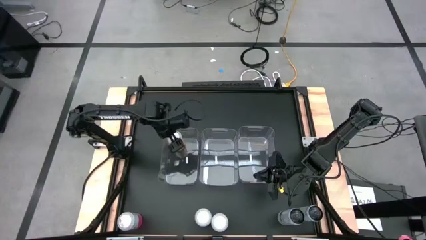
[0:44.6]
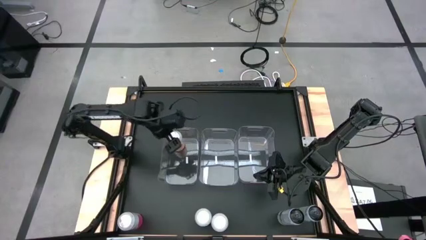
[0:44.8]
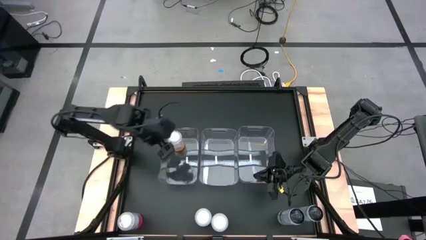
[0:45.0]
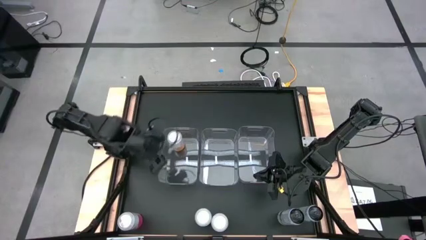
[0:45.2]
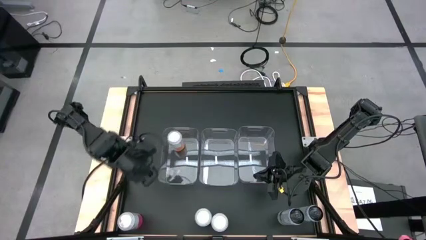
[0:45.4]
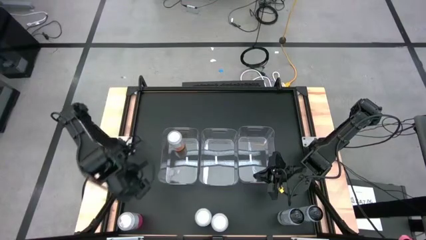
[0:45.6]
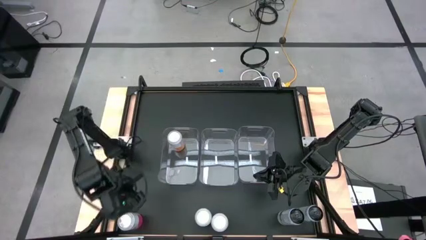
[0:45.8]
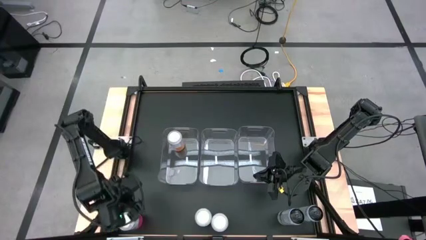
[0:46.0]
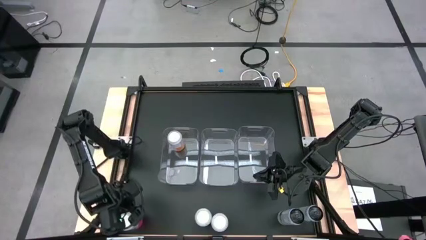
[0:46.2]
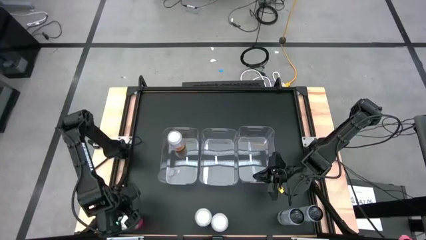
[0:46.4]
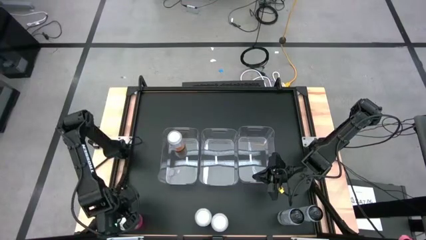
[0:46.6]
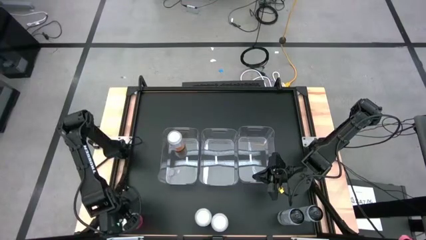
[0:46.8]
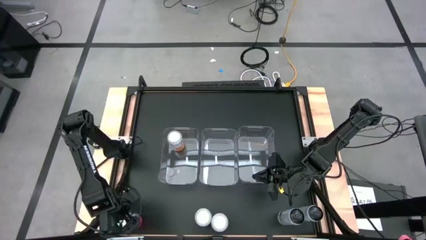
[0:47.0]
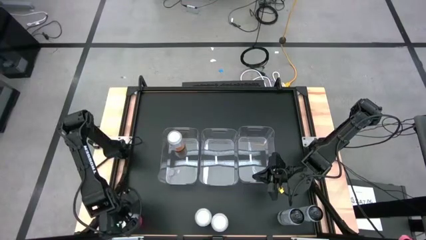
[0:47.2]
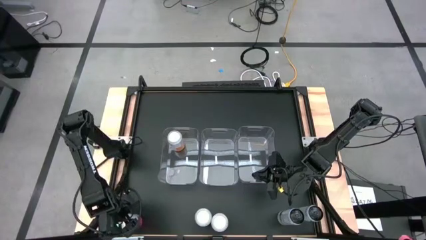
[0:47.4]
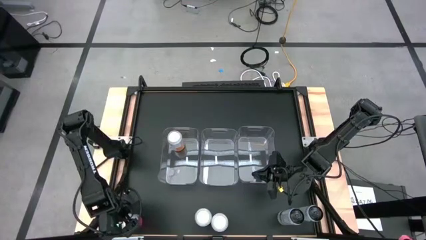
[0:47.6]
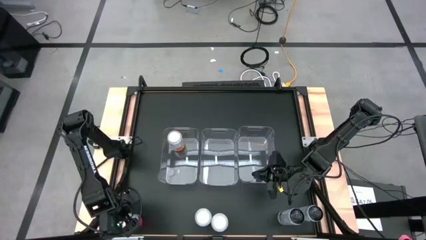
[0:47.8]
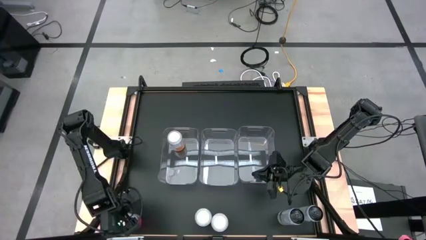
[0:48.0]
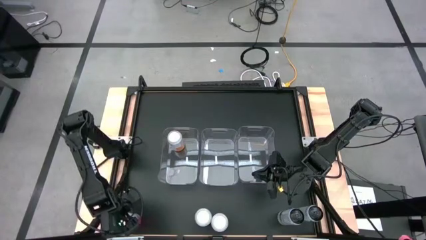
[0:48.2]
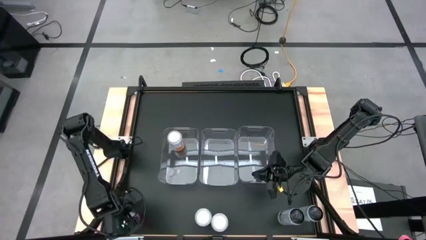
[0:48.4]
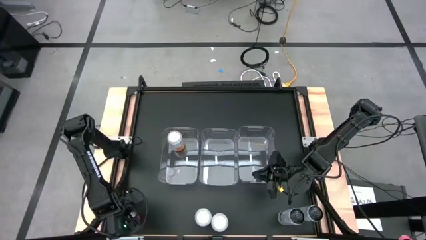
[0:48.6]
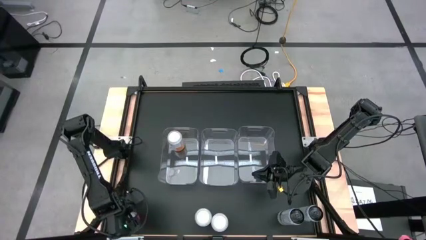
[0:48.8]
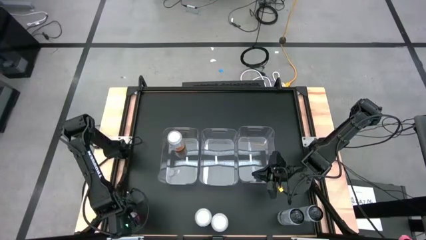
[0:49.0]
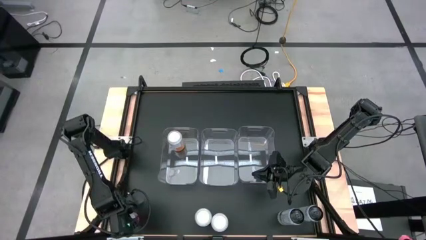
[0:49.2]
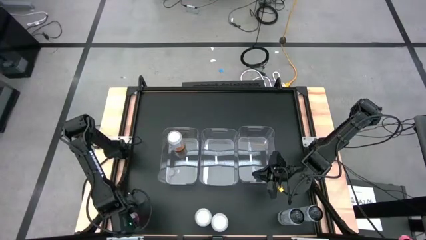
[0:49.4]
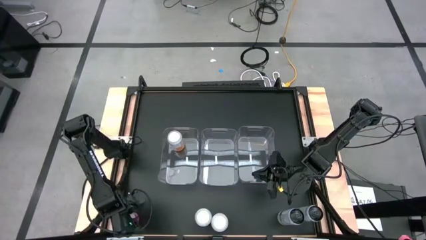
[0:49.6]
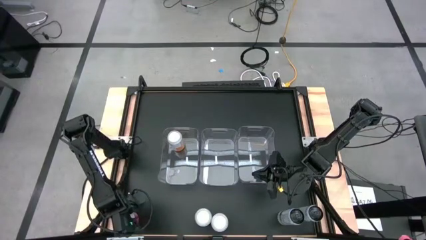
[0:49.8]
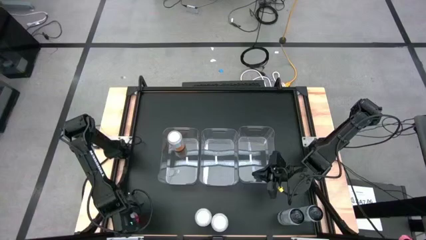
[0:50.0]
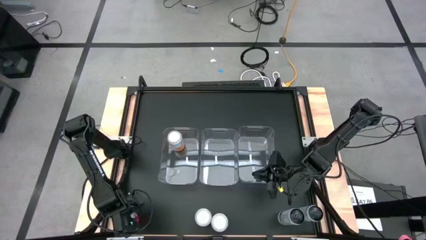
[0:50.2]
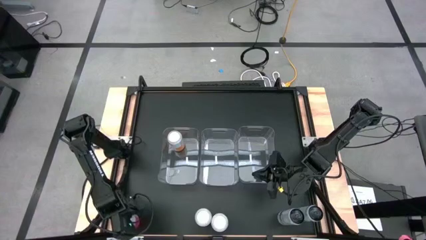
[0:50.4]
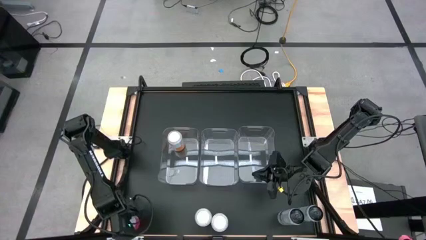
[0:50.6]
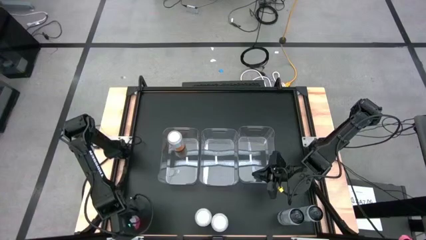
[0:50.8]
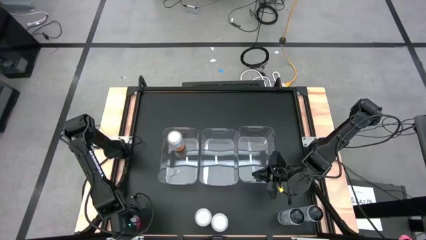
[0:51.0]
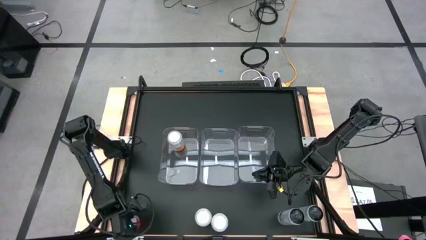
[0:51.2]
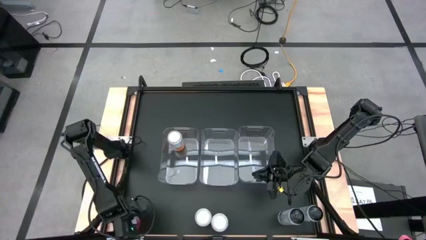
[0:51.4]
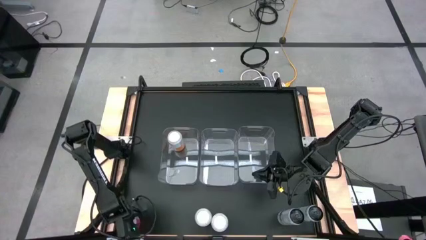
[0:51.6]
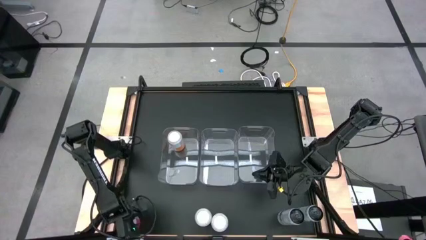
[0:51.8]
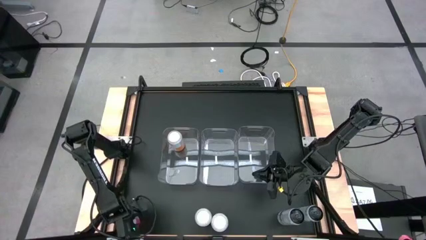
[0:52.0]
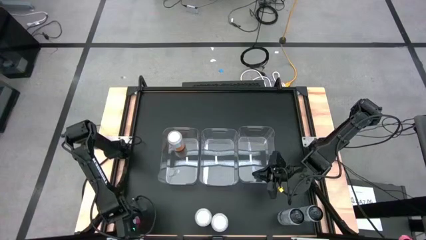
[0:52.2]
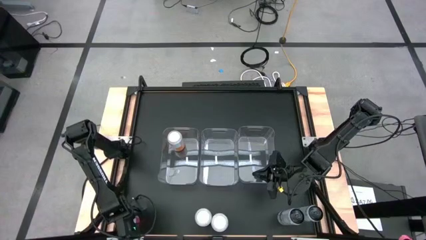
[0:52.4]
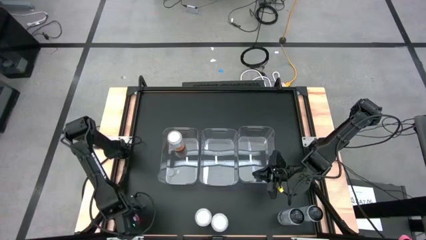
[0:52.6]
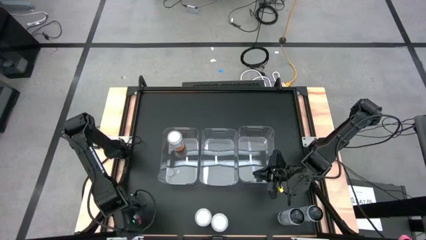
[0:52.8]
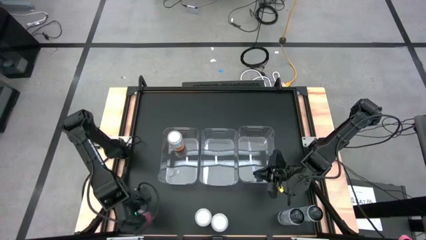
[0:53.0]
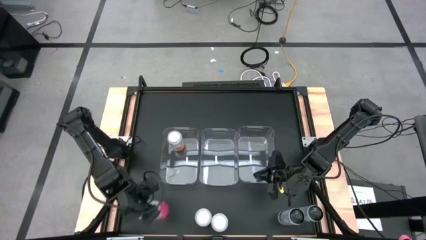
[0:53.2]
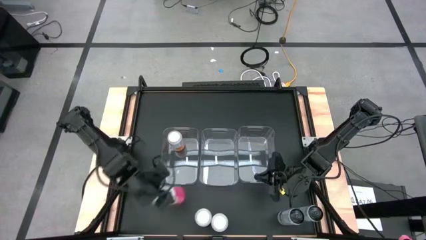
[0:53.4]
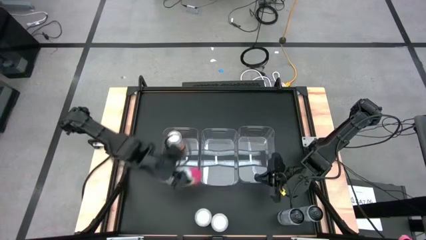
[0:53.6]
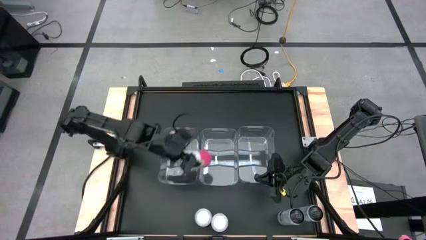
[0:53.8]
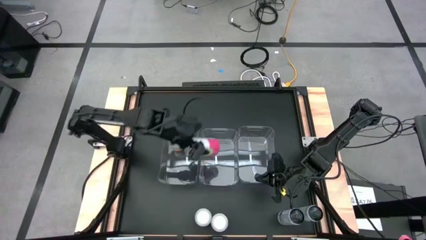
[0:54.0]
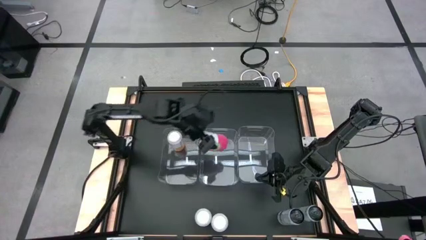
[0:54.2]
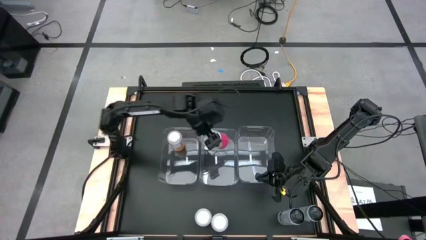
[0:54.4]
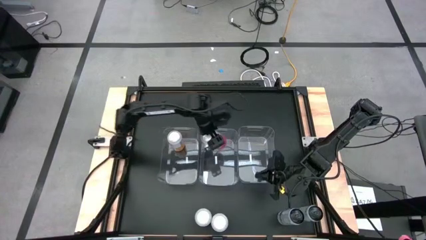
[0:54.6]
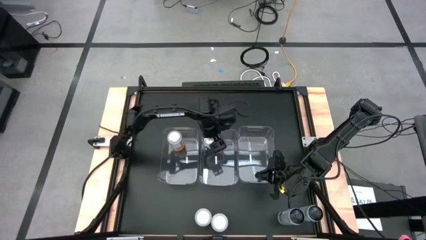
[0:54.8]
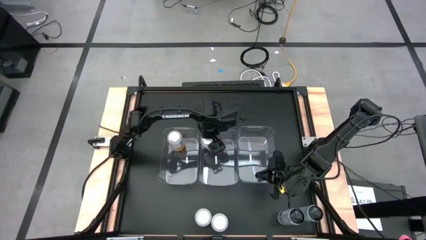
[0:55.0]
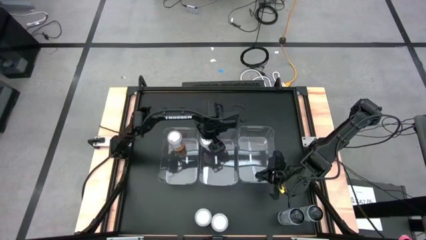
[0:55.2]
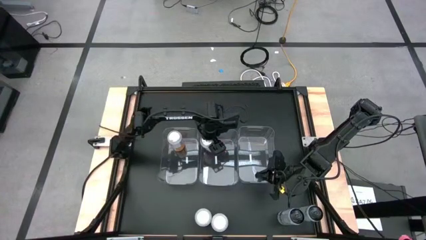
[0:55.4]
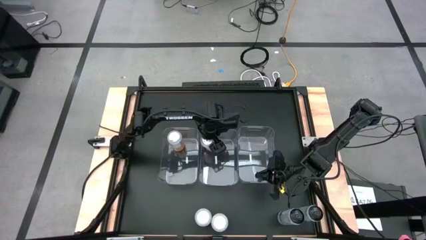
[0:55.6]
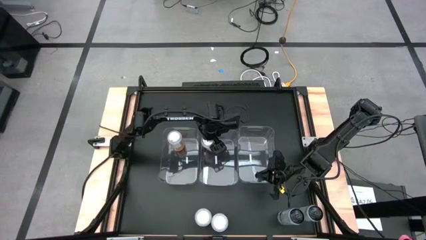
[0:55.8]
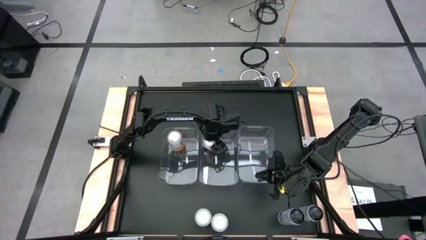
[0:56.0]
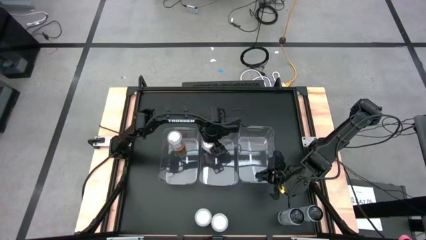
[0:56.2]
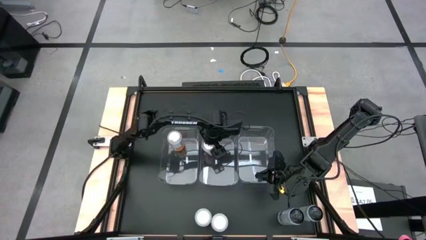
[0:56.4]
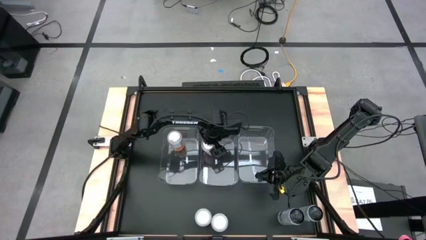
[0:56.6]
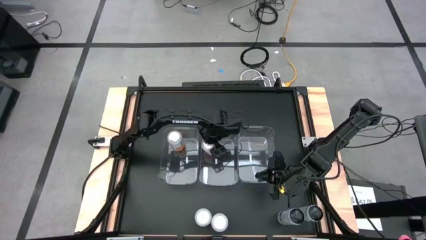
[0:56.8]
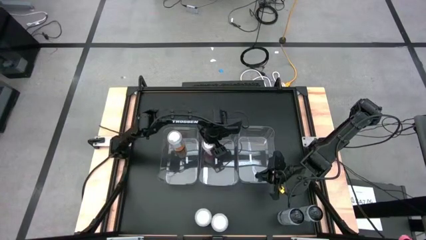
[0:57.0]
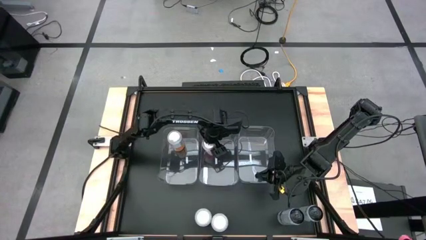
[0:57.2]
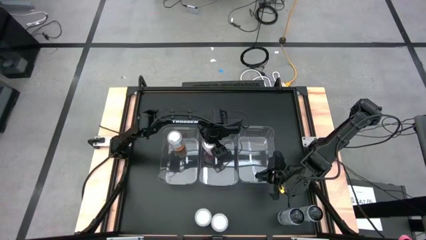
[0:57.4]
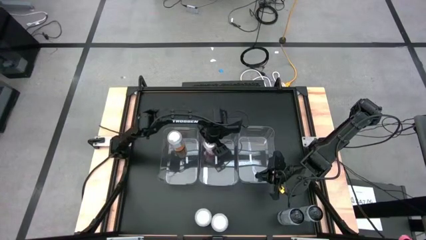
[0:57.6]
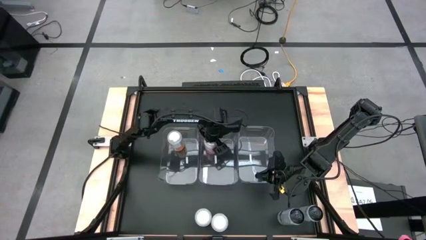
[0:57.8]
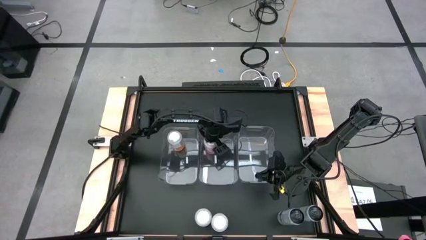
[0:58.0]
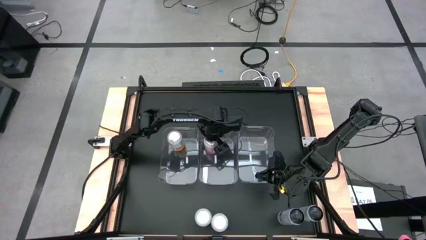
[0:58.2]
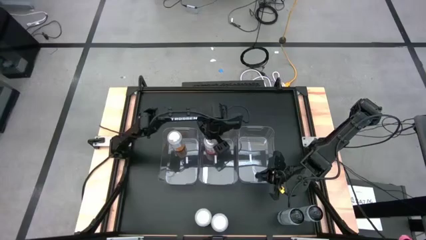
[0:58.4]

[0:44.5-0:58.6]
Task: Sort soda cans
Put the left pink soda can into the center transparent bin
